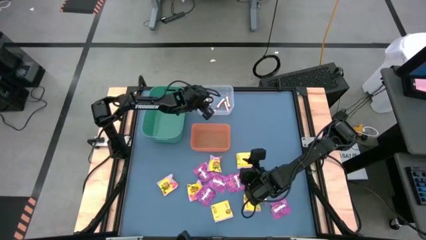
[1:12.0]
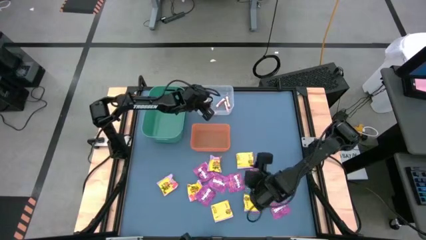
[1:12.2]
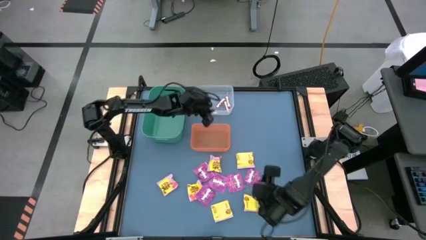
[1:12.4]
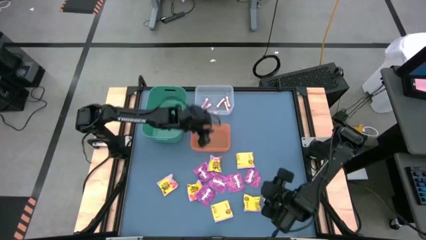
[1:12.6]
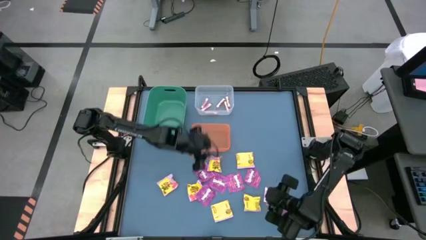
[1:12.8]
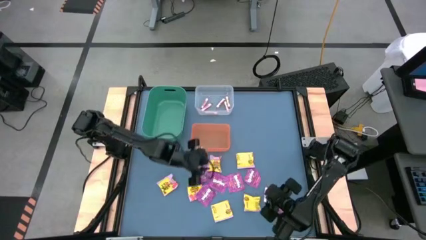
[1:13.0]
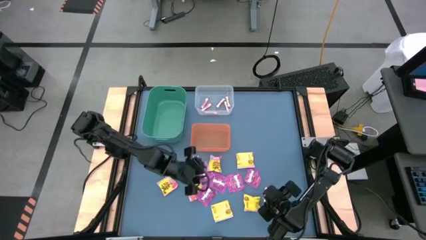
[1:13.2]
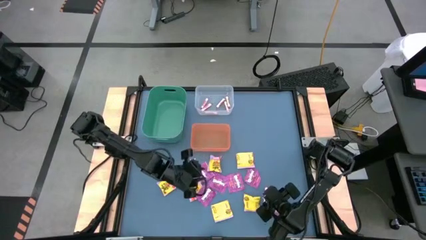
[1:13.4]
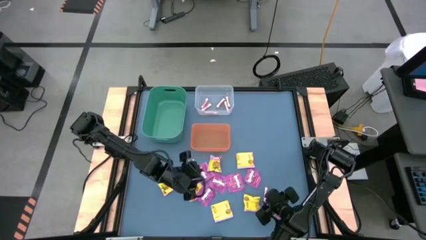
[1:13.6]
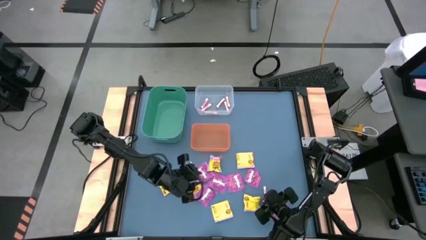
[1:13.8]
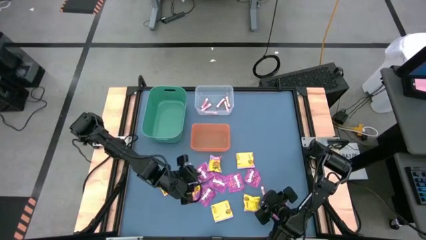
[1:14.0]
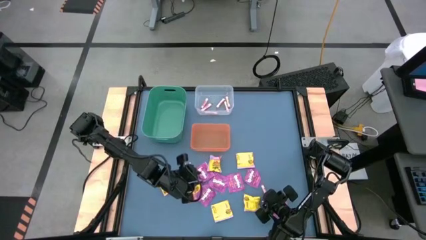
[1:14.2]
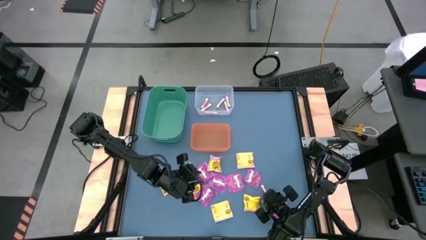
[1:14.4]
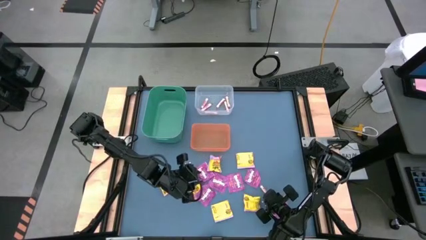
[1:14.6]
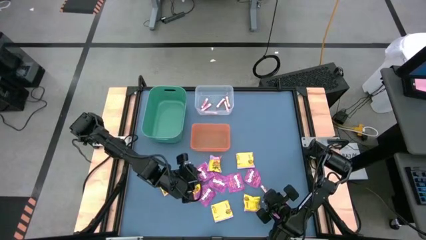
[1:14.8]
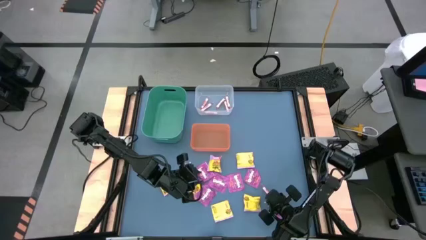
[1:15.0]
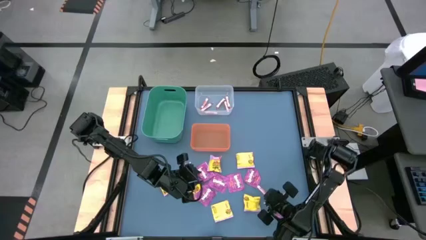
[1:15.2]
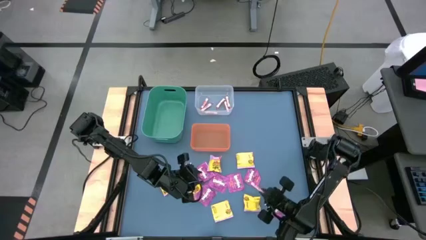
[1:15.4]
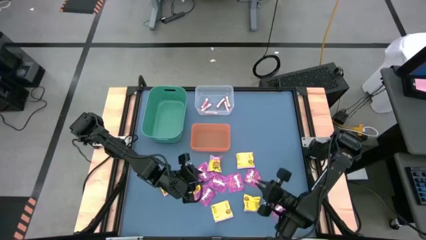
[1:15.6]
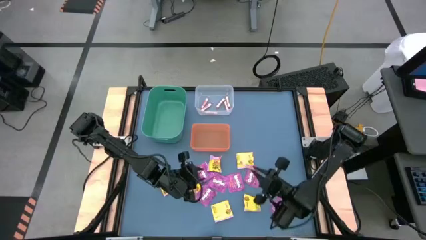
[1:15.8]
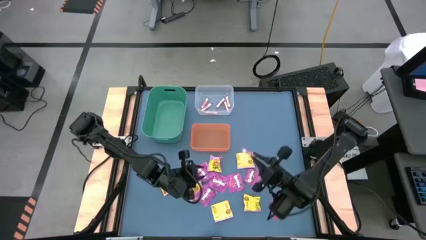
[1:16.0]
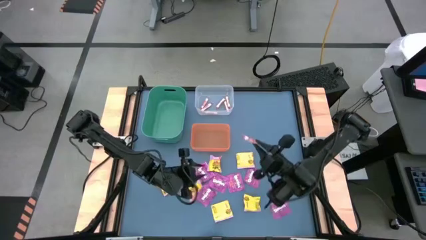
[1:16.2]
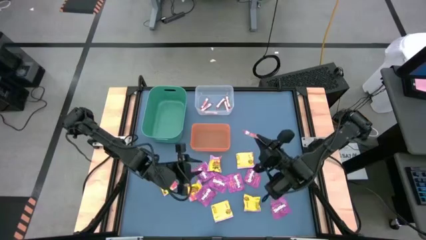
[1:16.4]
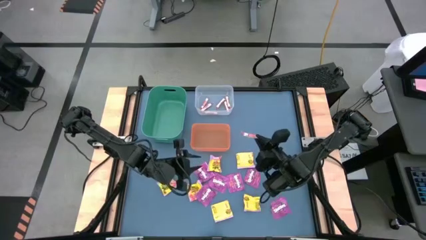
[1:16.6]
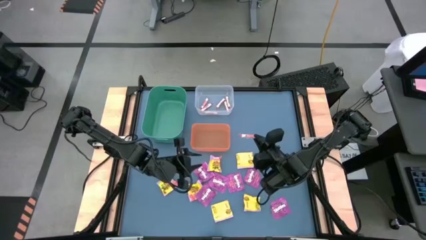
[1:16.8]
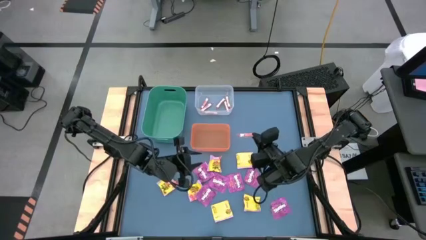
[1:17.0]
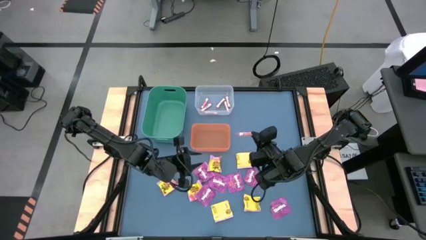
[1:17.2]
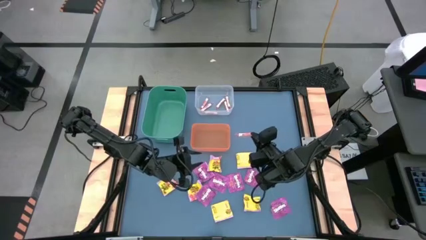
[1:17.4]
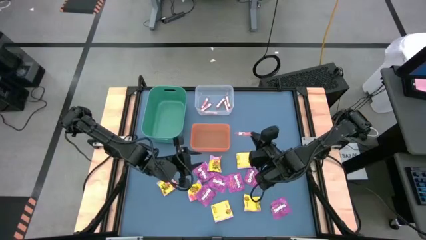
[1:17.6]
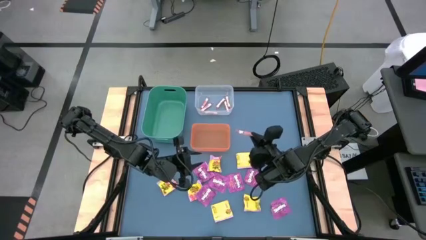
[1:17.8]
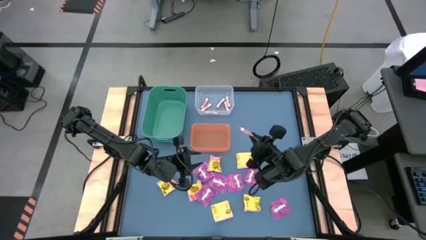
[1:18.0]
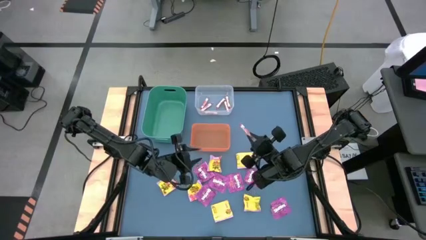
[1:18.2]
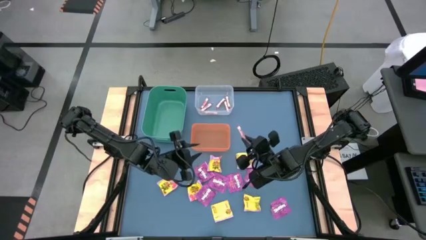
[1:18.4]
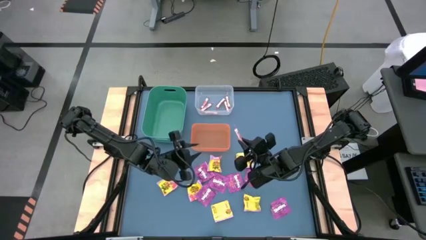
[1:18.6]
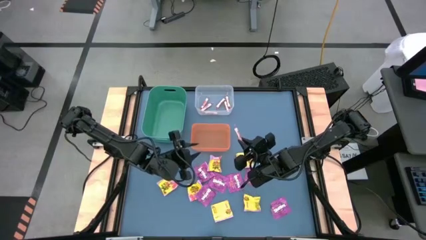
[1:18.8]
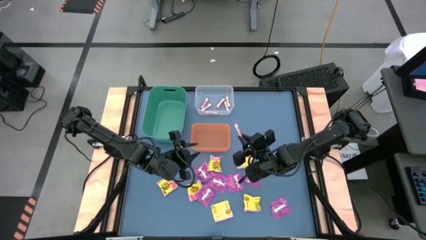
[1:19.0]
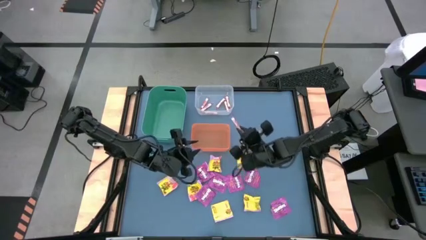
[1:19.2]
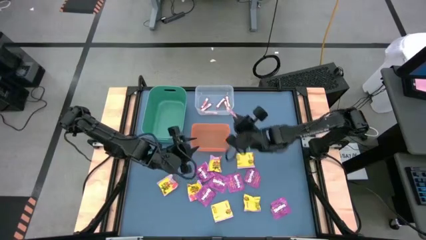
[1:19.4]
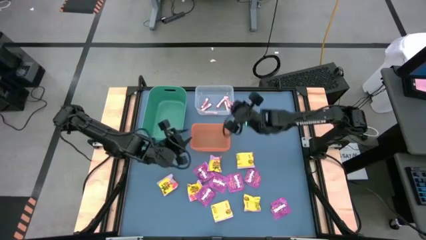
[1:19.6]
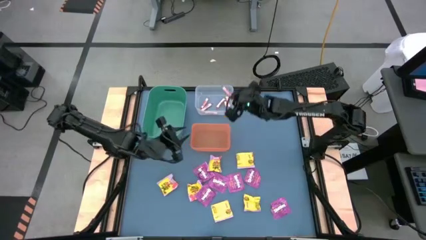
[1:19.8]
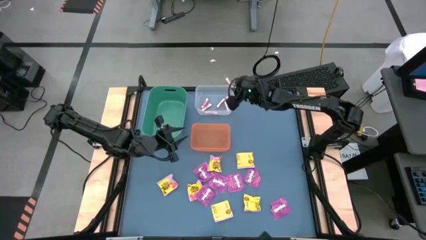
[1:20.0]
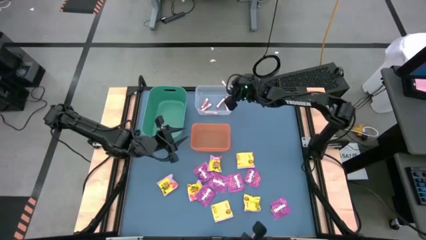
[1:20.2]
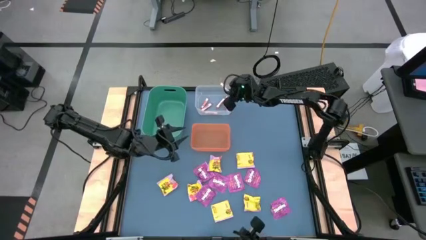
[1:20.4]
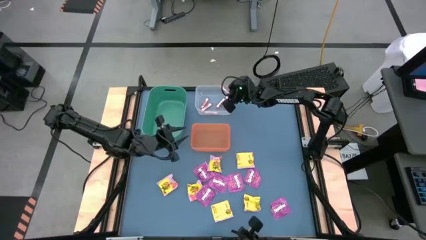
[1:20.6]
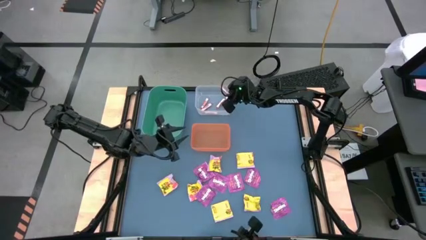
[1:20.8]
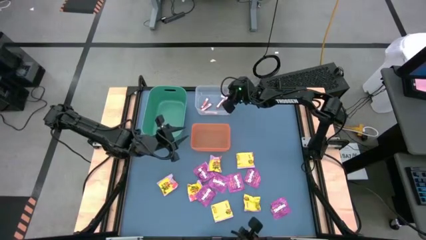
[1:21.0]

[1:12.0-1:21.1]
Task: Sort candy
Put the white candy into the transparent bin

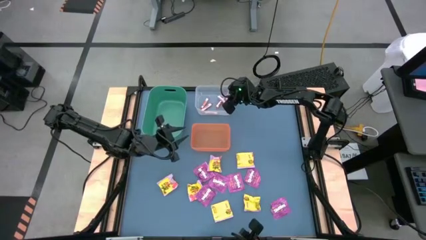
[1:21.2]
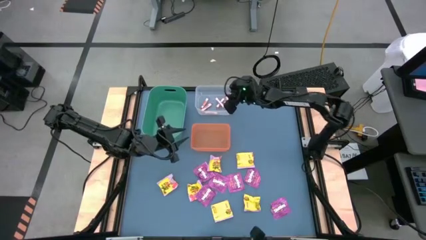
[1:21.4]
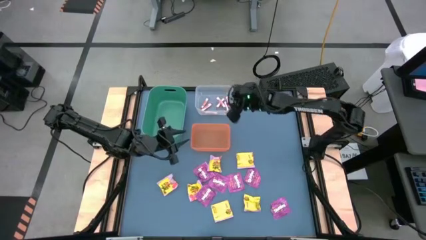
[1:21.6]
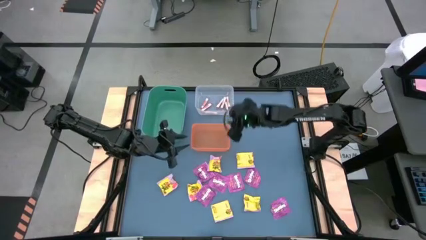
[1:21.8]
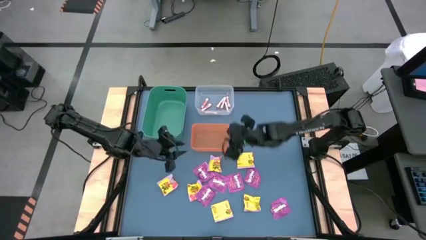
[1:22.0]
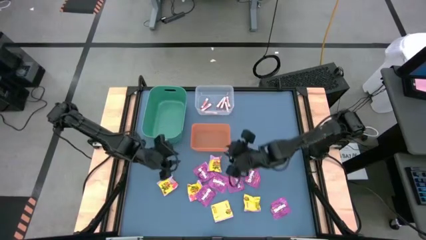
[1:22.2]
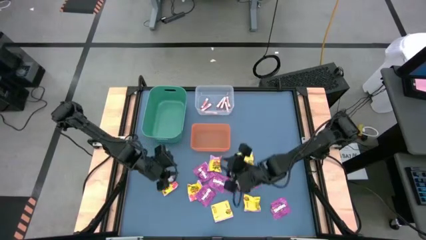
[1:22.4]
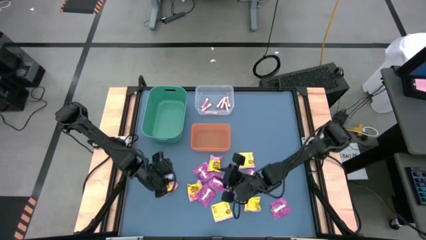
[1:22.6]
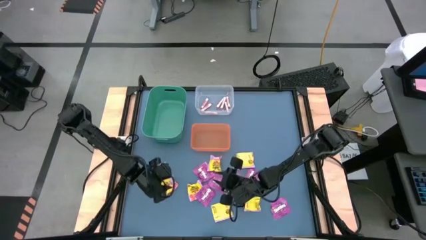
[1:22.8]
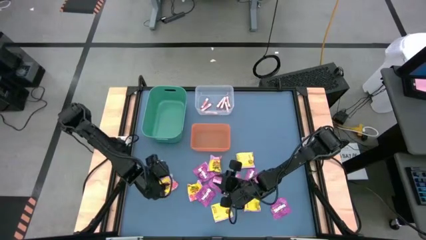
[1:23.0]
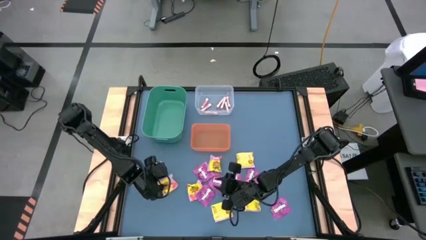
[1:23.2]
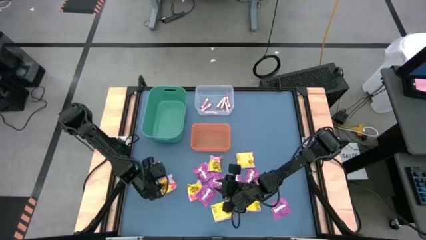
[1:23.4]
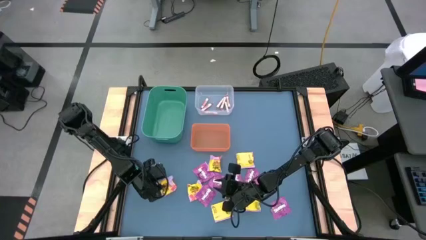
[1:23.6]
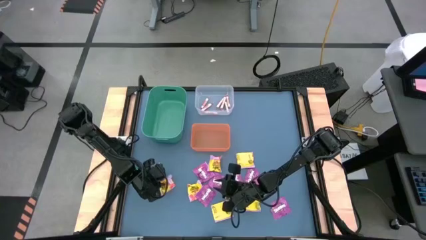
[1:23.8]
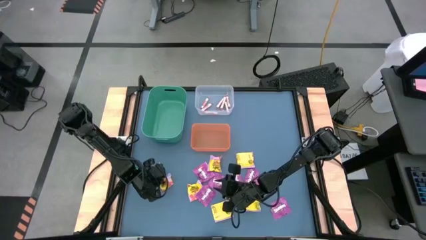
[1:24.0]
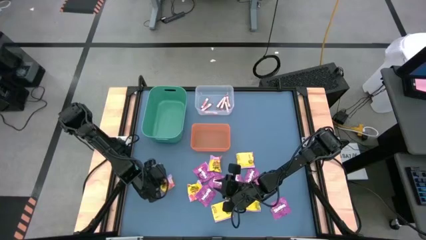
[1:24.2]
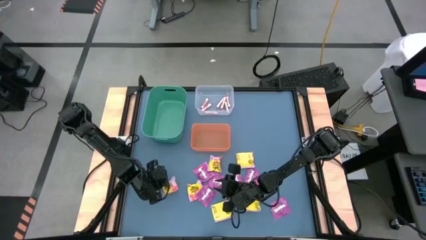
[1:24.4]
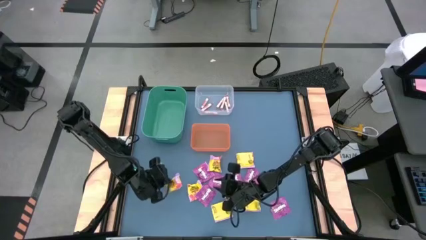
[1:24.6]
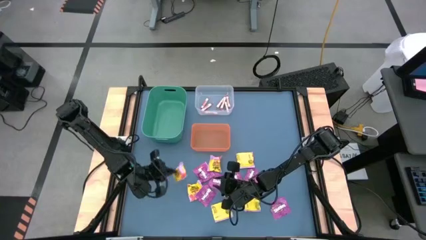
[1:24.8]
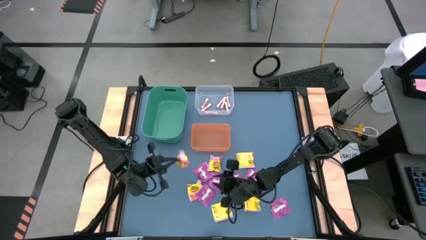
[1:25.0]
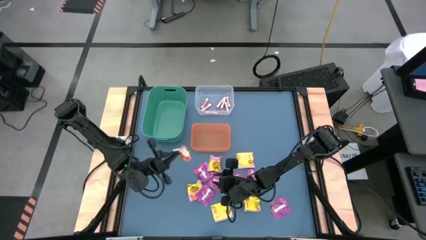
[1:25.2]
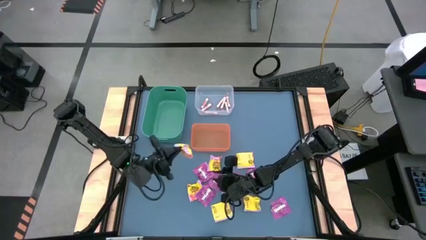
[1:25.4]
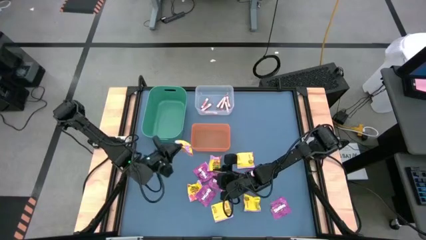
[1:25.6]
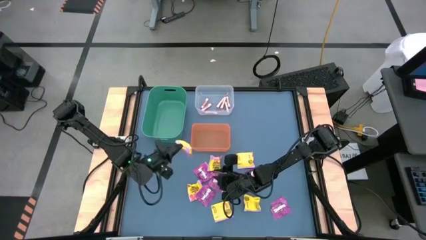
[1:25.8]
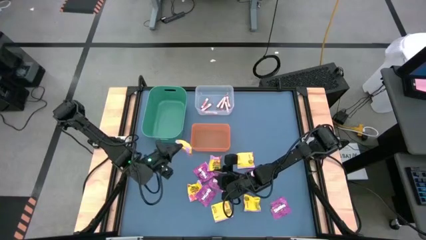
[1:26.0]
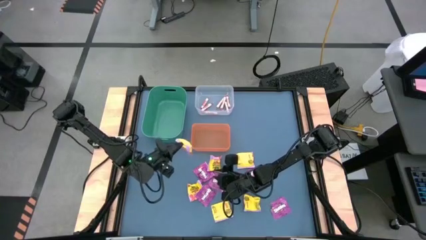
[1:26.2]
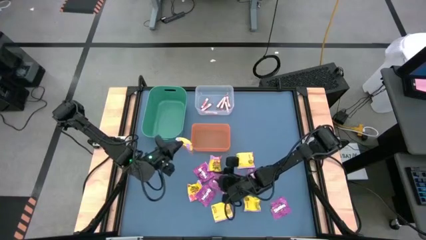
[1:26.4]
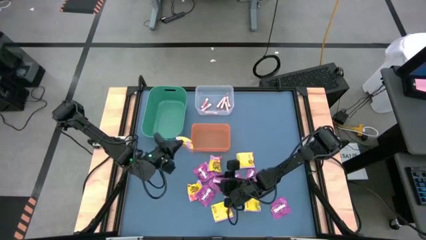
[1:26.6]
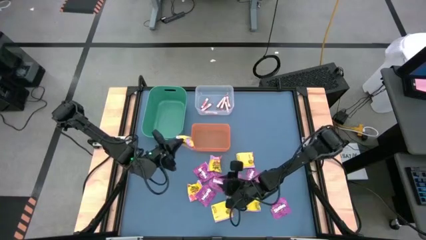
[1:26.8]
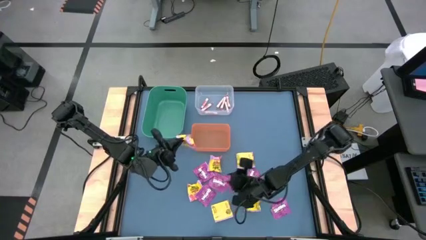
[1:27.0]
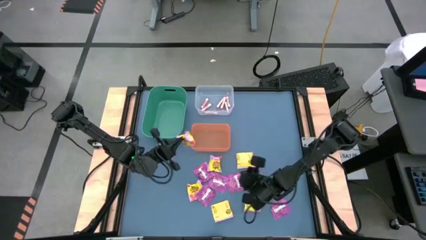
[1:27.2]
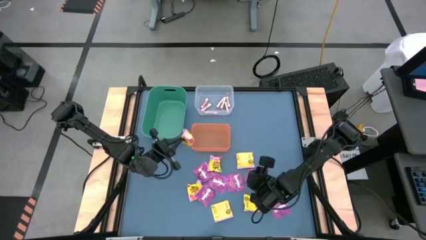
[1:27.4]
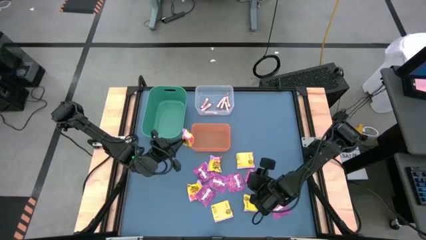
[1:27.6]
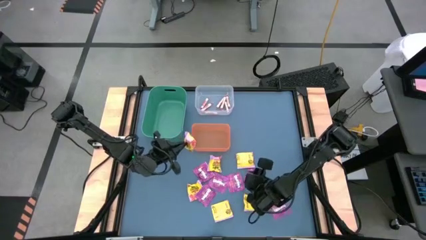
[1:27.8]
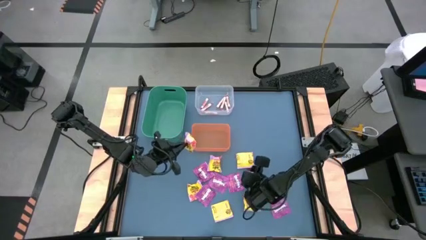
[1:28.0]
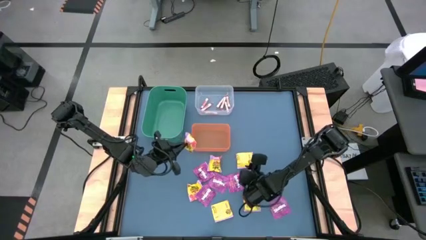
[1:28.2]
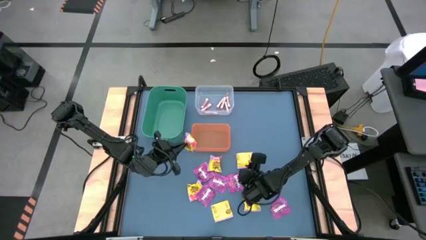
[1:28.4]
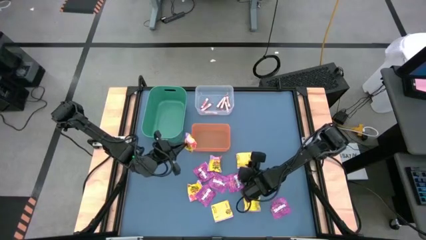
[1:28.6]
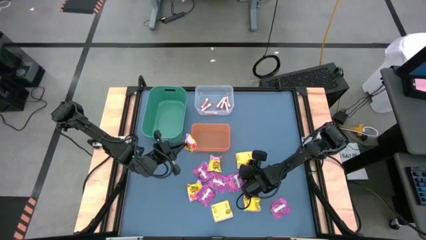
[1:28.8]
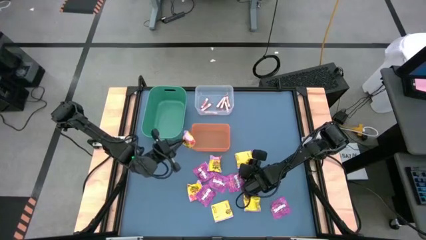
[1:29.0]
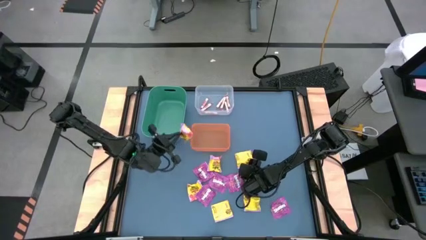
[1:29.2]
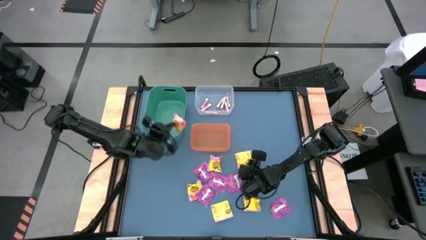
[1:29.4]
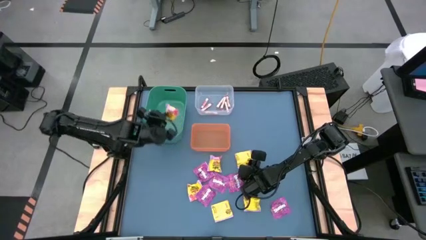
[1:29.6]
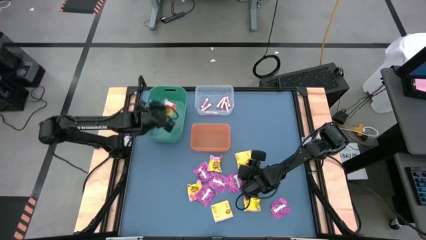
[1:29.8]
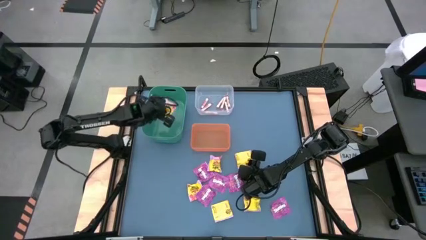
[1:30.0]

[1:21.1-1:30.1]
Put the yellow candy into the green bin
